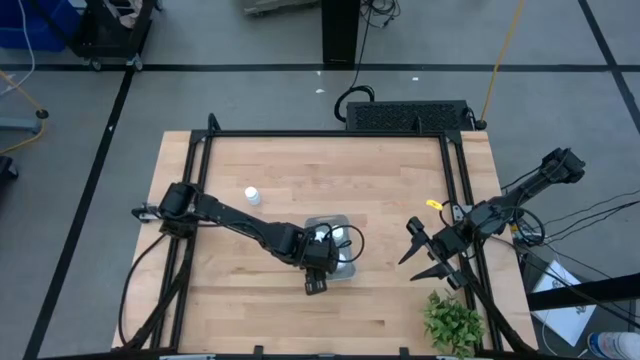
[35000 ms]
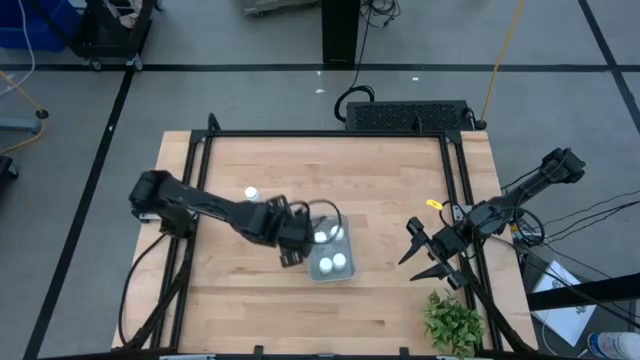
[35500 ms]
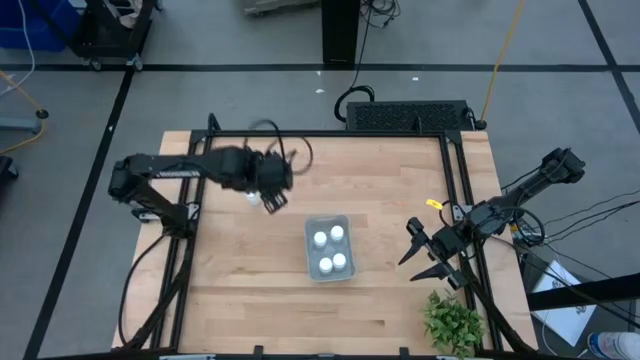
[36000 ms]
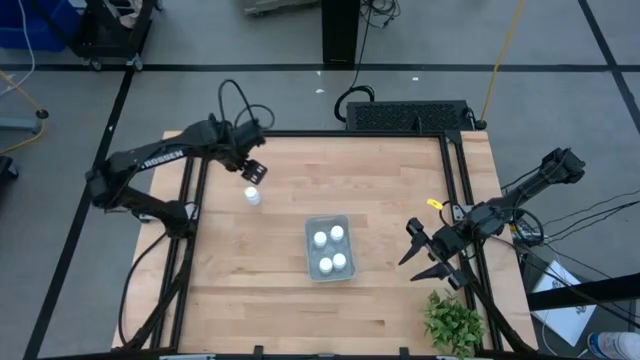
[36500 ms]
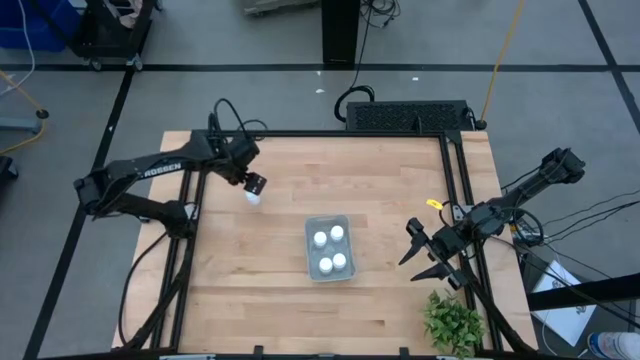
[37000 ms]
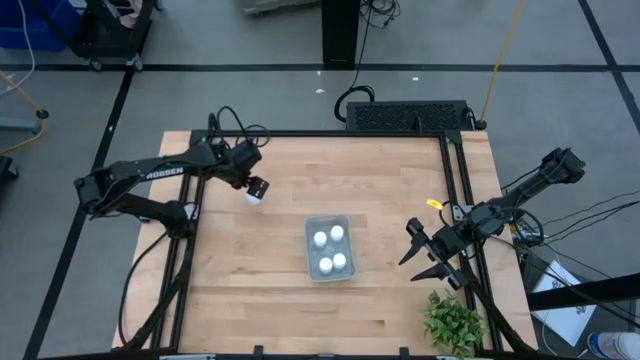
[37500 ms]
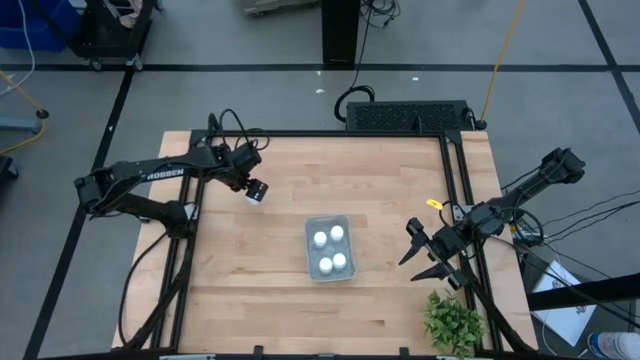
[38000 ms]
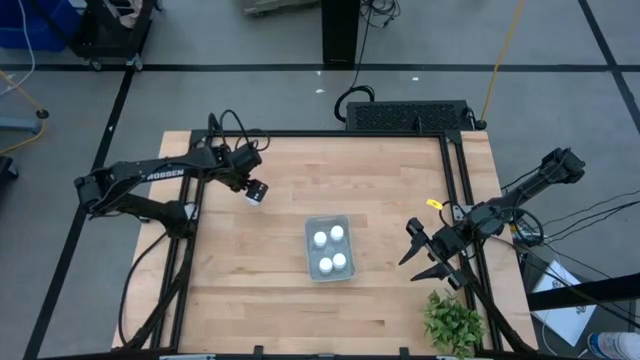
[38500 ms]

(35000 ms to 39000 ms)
Task: Pick and place pill bottles into a basket
Put the white medicine bottle into the gray bin

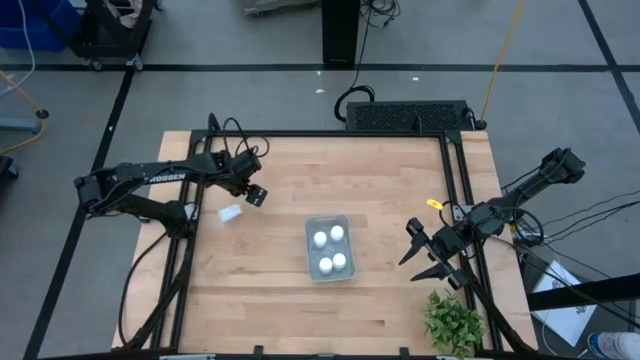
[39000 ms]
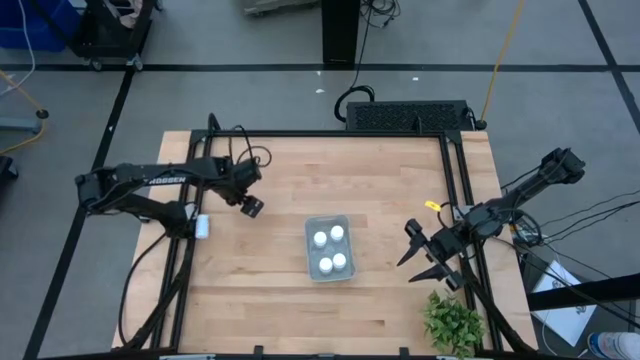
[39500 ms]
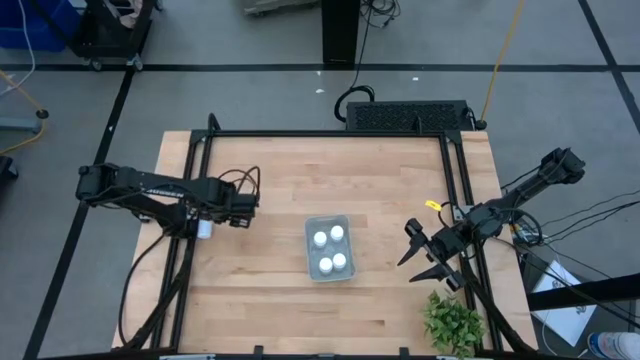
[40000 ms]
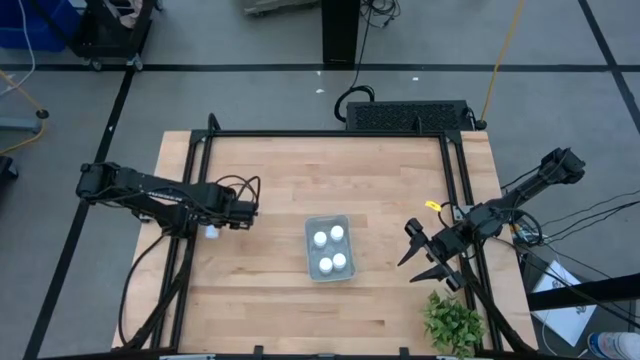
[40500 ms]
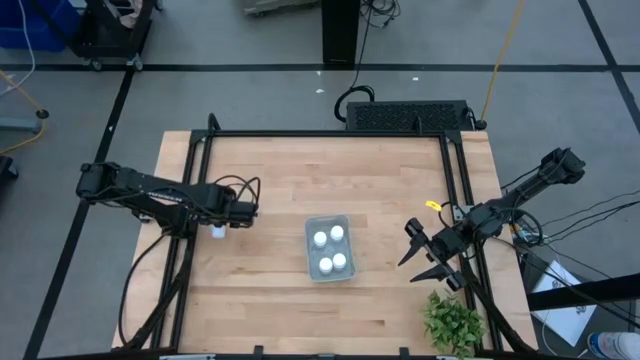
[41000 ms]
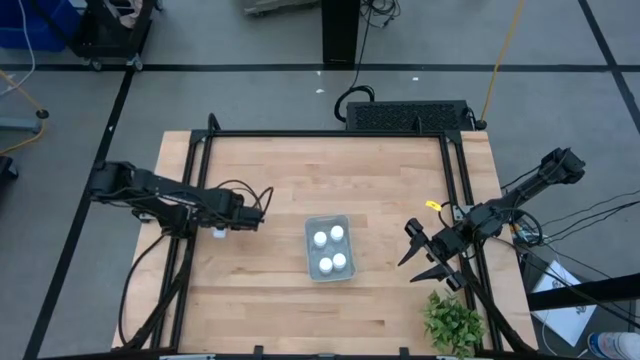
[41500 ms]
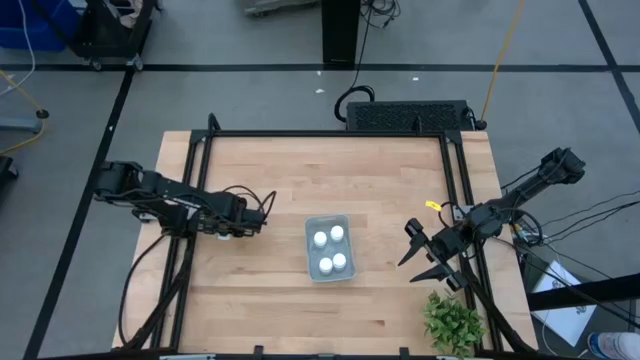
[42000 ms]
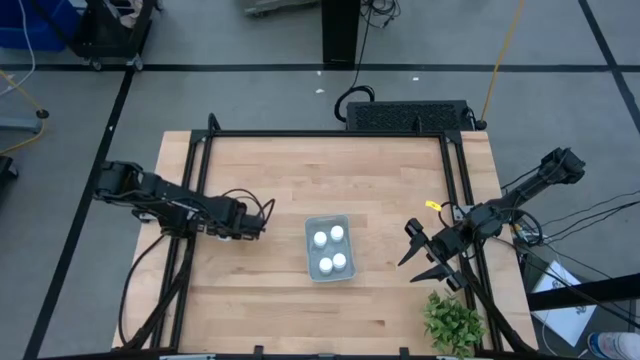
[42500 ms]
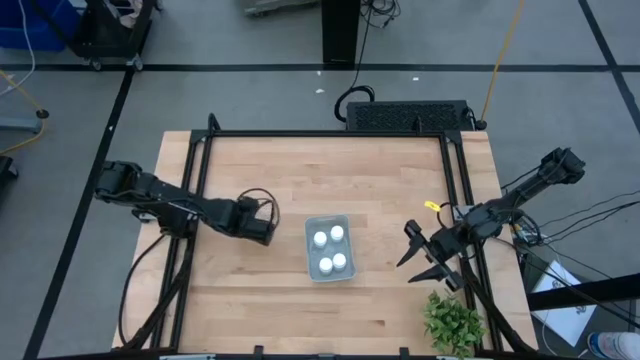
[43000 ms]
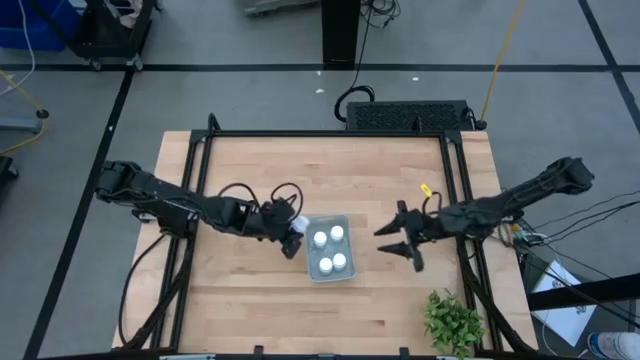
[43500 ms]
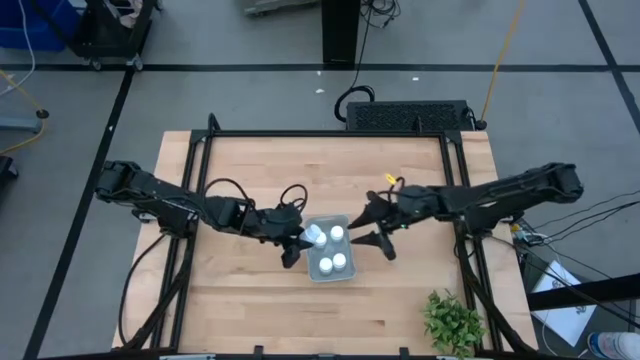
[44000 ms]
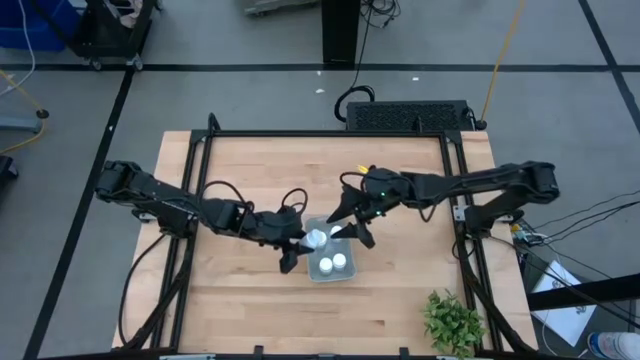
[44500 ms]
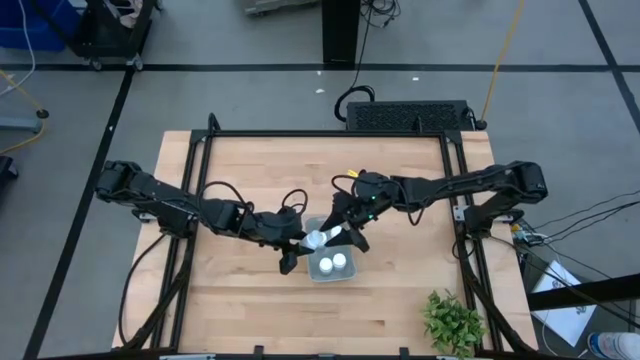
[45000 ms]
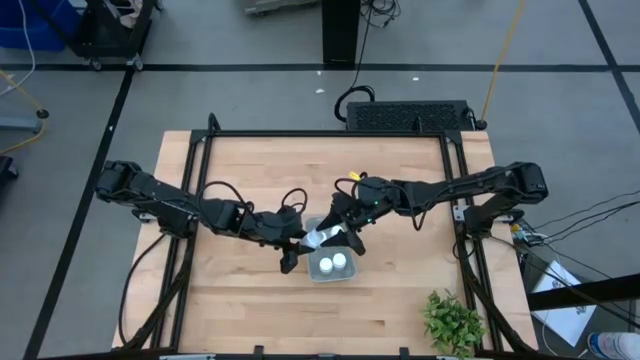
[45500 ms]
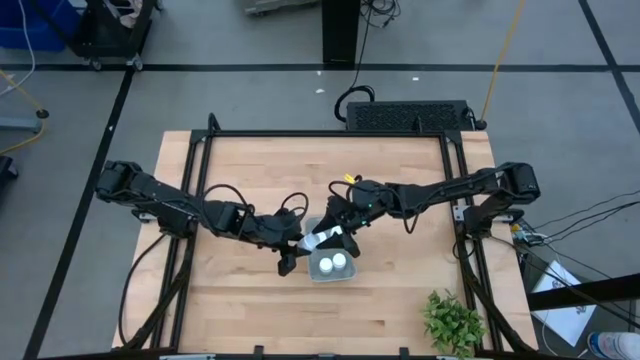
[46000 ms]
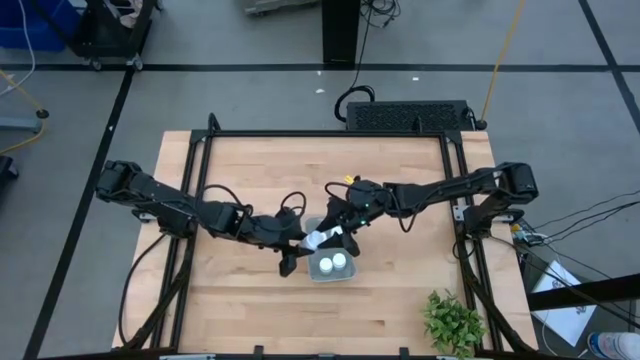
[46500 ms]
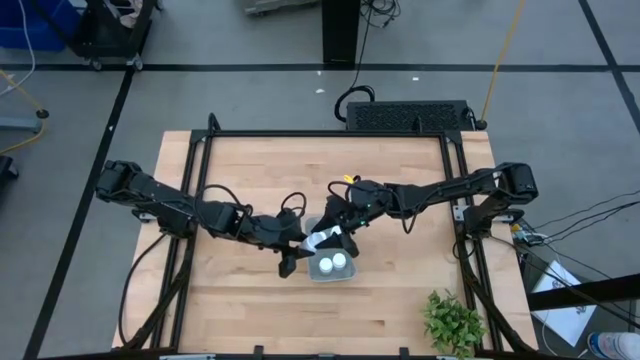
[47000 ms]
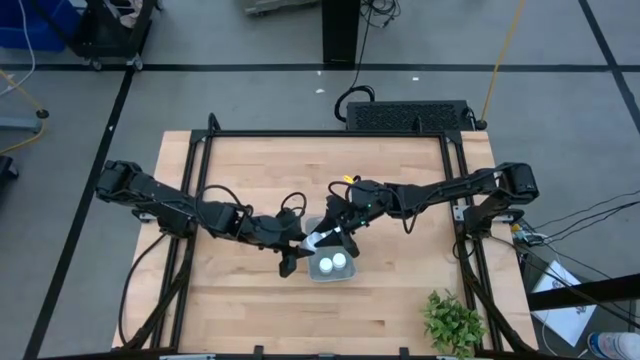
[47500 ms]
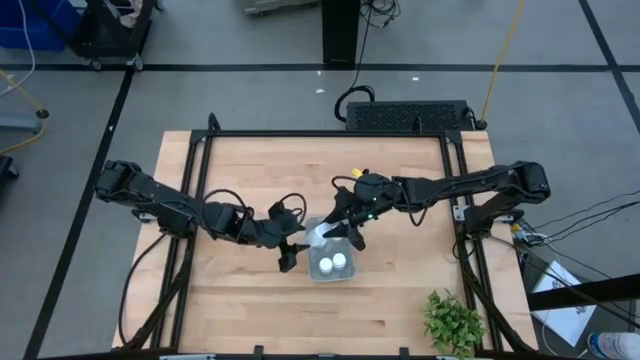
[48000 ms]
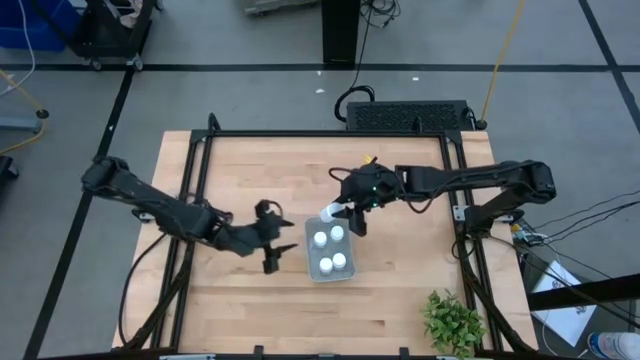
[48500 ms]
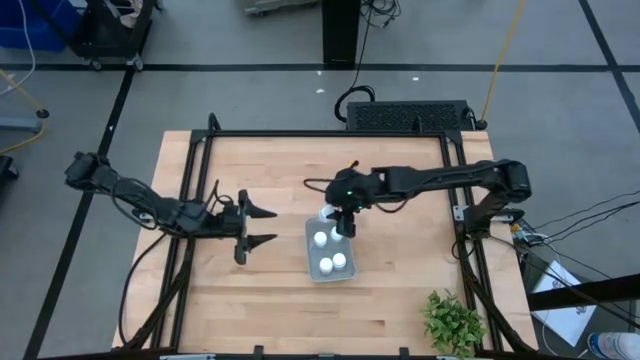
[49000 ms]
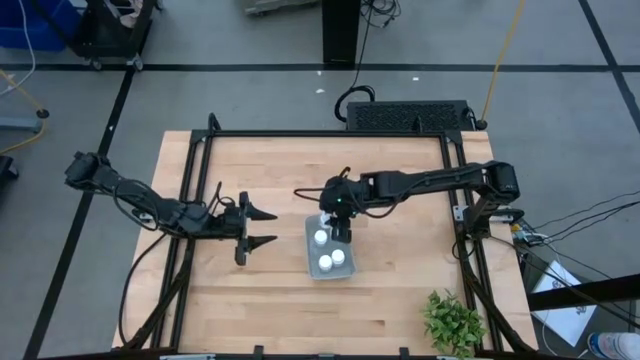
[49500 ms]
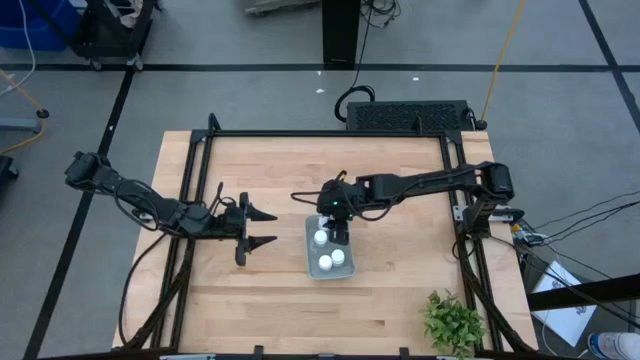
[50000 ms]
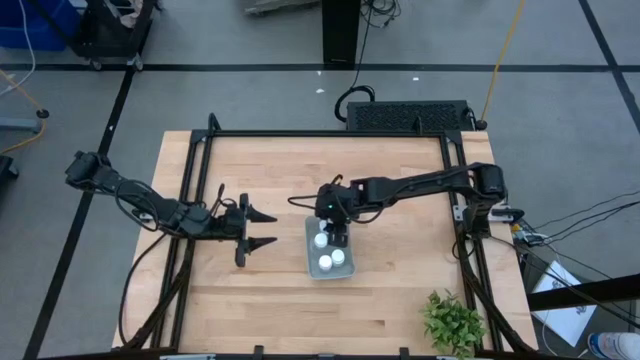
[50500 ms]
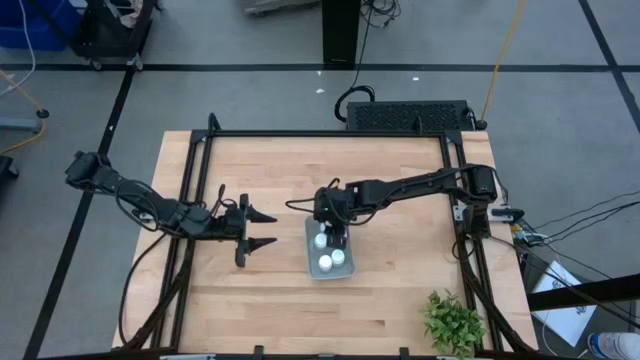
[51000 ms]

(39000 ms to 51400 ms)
Put the white medicine bottle into the gray bin

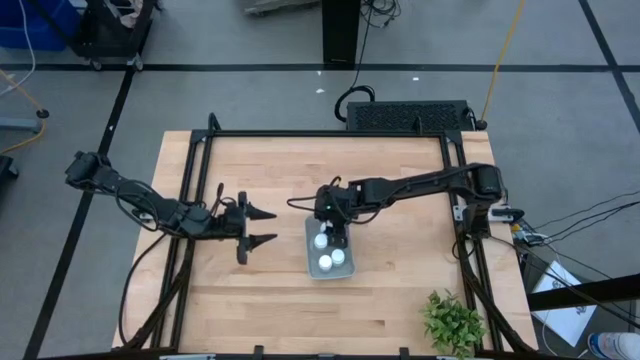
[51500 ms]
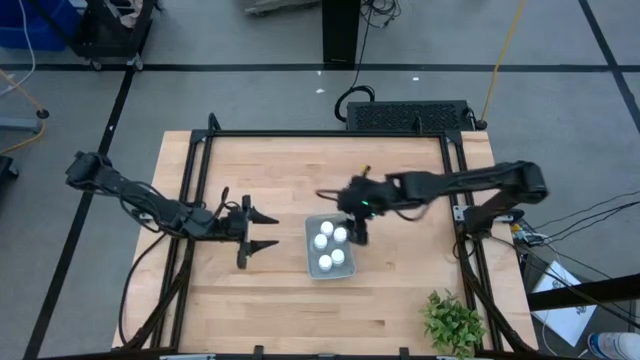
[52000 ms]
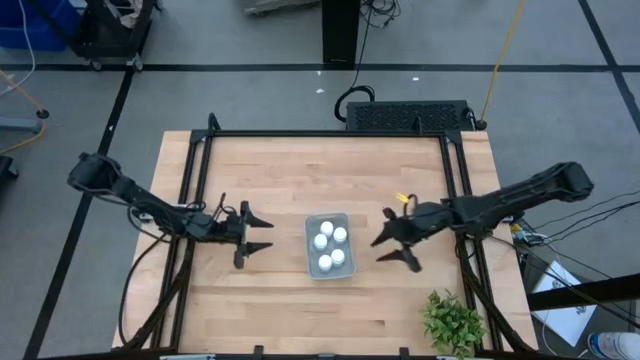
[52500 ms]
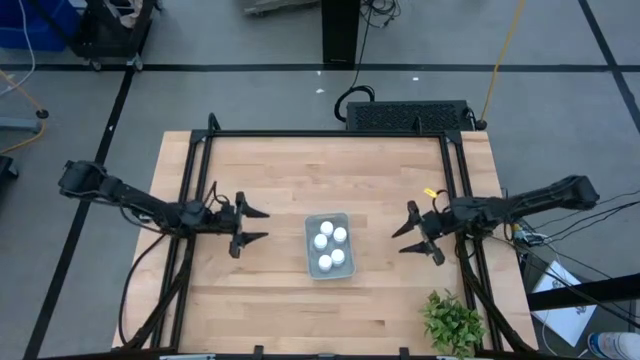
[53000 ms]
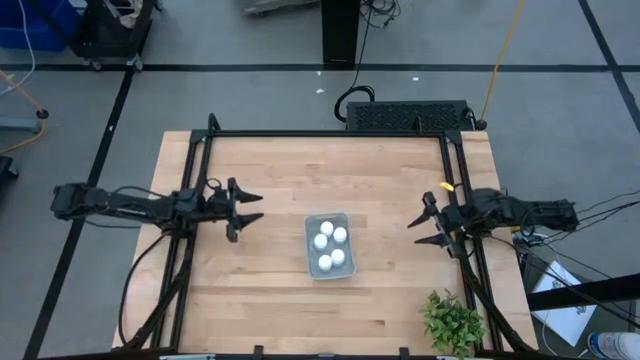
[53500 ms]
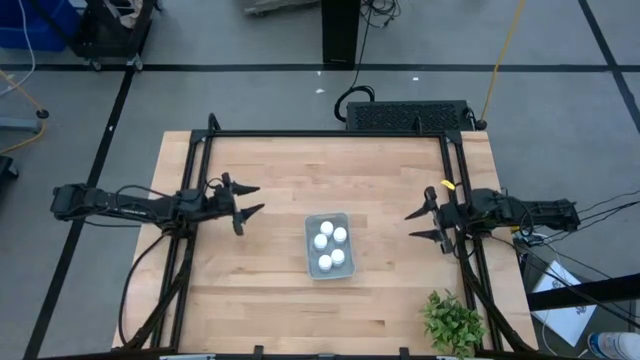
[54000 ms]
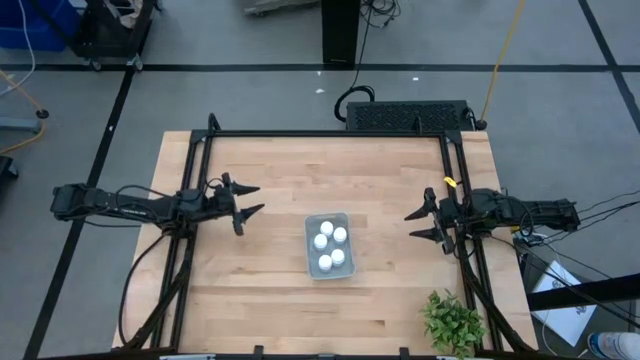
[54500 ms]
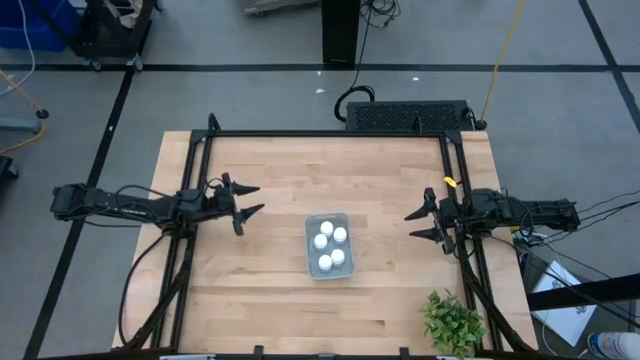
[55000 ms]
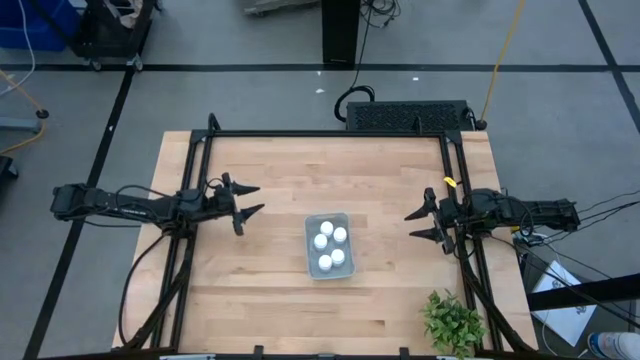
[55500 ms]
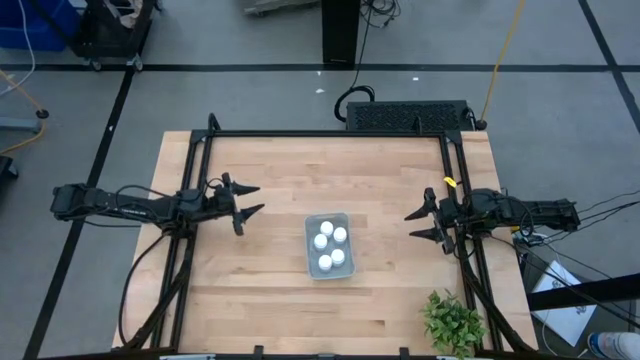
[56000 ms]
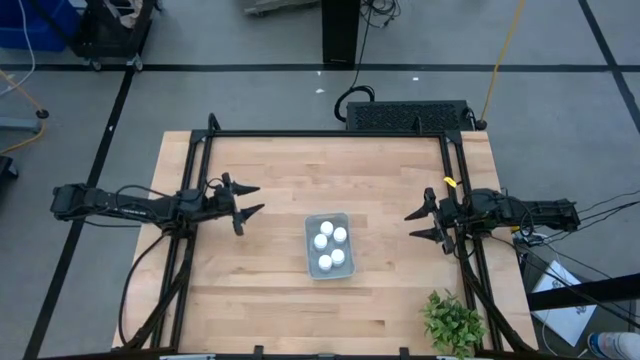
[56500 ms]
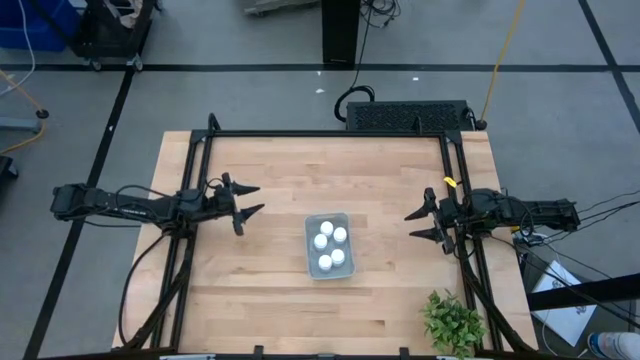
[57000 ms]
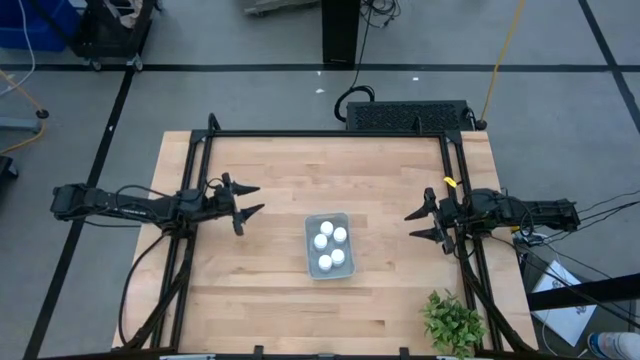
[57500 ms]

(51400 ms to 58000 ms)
Return to Home Position
